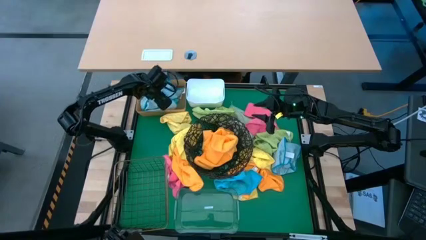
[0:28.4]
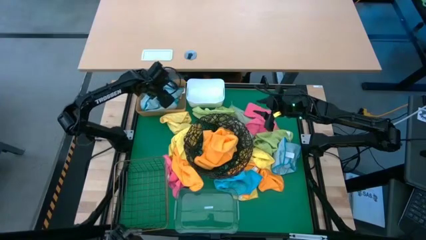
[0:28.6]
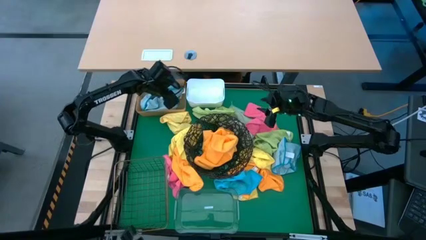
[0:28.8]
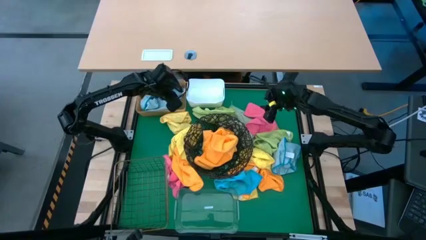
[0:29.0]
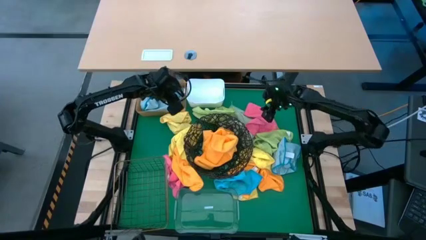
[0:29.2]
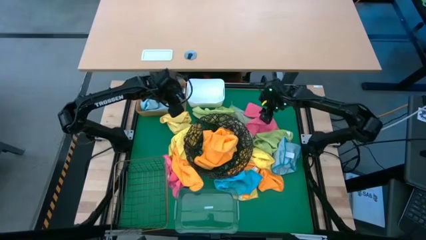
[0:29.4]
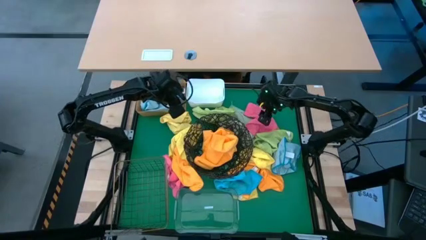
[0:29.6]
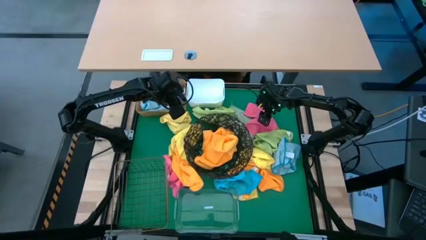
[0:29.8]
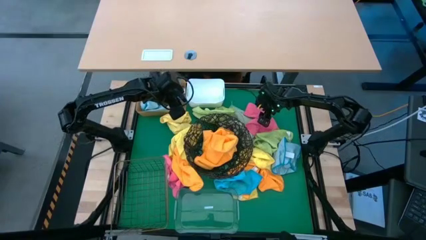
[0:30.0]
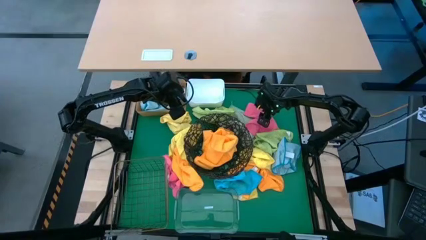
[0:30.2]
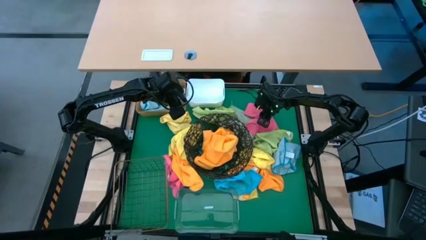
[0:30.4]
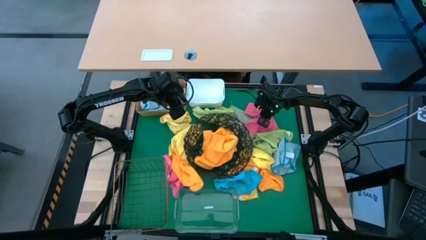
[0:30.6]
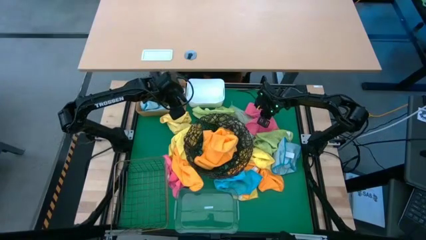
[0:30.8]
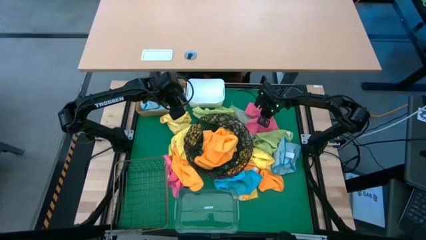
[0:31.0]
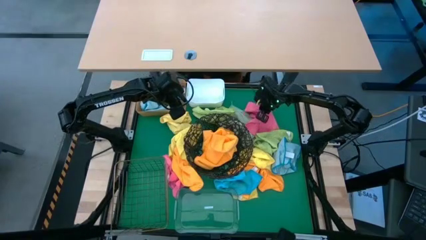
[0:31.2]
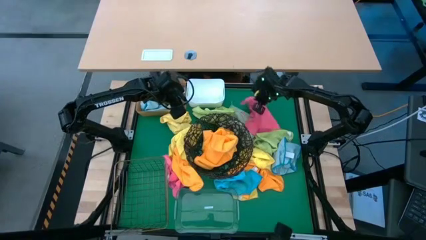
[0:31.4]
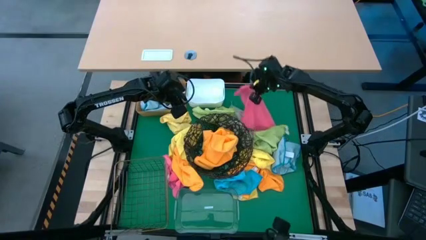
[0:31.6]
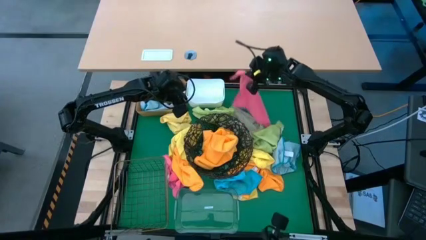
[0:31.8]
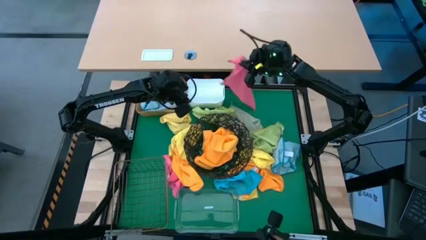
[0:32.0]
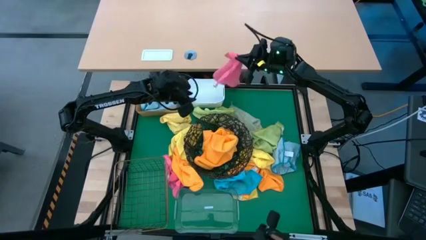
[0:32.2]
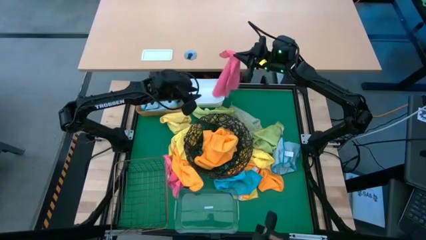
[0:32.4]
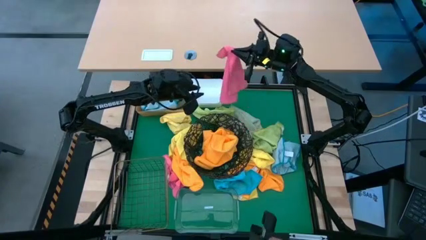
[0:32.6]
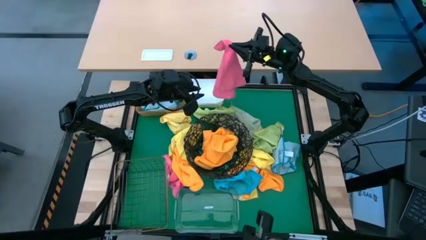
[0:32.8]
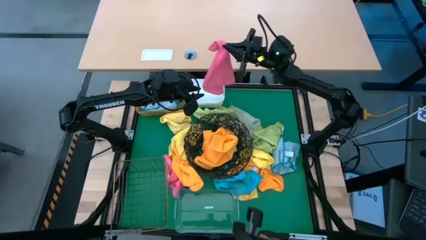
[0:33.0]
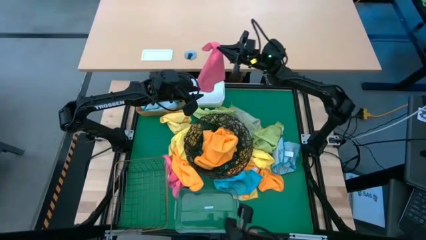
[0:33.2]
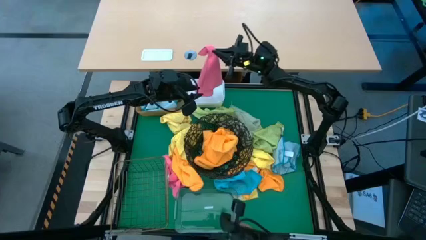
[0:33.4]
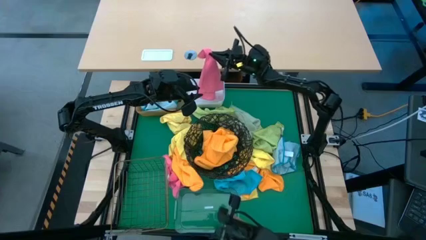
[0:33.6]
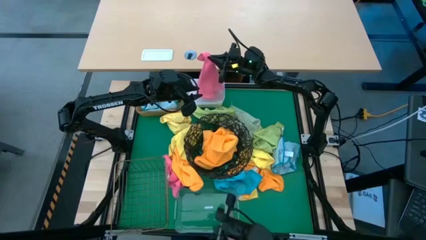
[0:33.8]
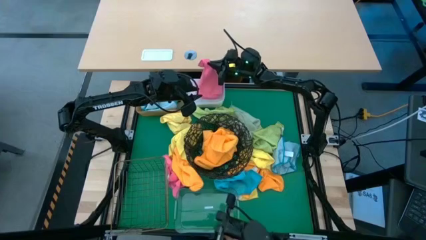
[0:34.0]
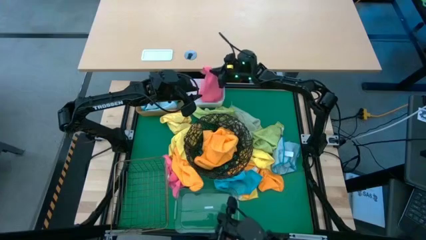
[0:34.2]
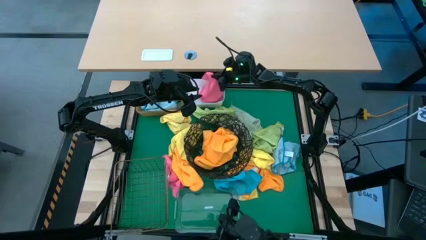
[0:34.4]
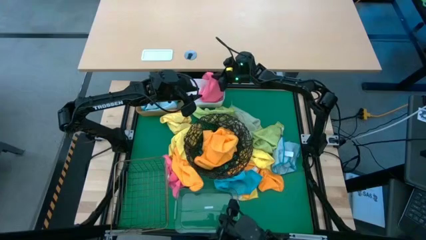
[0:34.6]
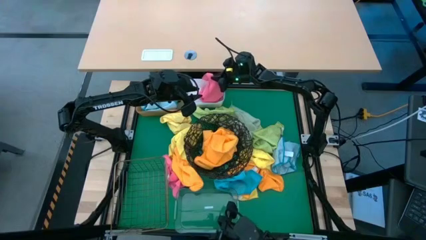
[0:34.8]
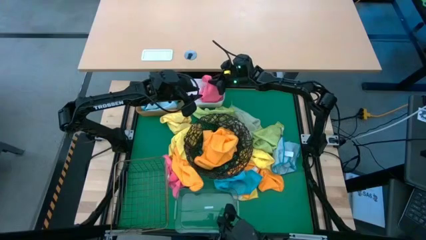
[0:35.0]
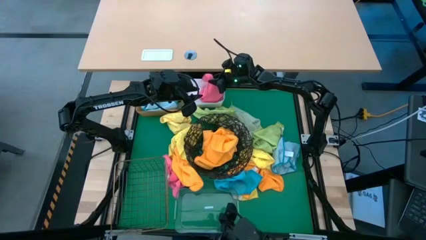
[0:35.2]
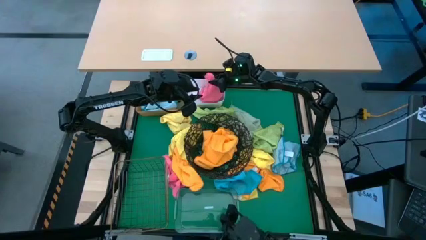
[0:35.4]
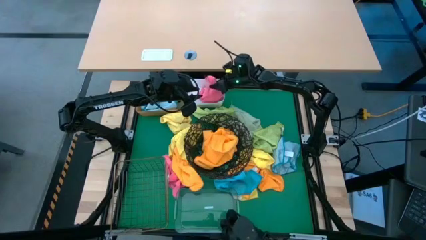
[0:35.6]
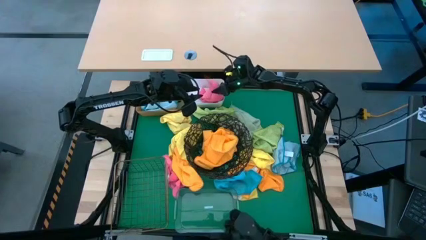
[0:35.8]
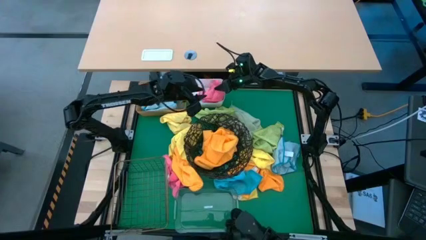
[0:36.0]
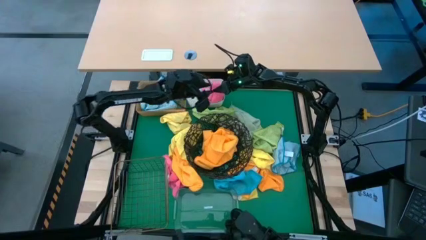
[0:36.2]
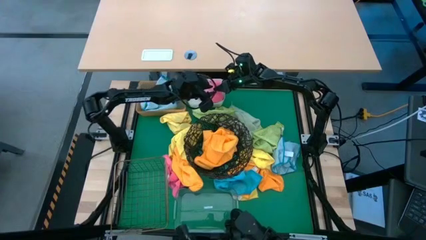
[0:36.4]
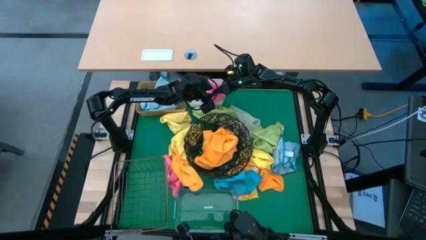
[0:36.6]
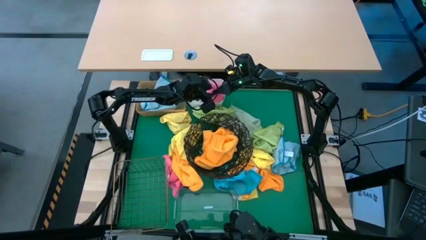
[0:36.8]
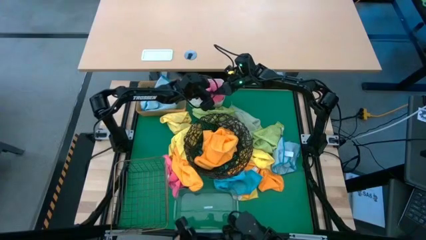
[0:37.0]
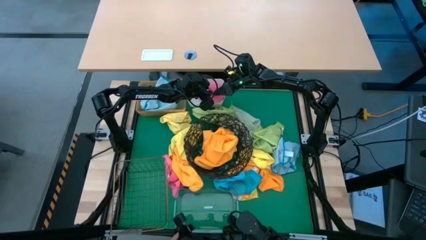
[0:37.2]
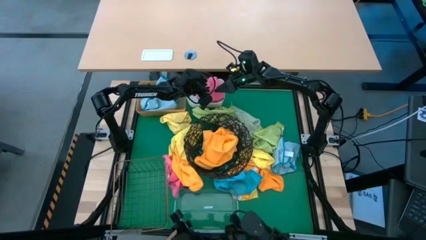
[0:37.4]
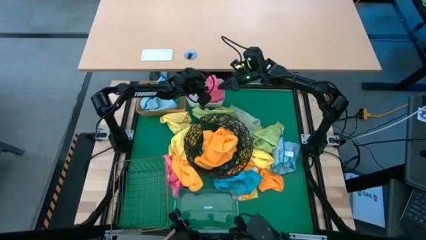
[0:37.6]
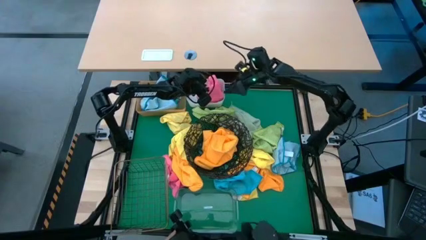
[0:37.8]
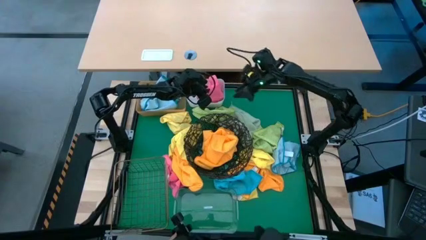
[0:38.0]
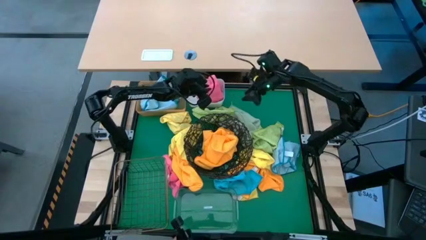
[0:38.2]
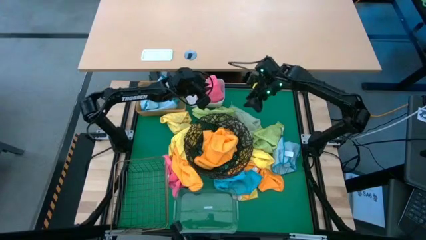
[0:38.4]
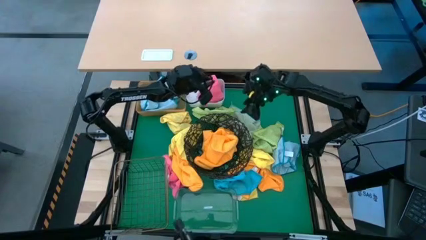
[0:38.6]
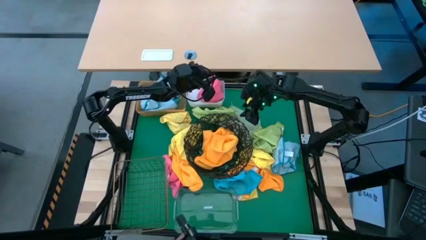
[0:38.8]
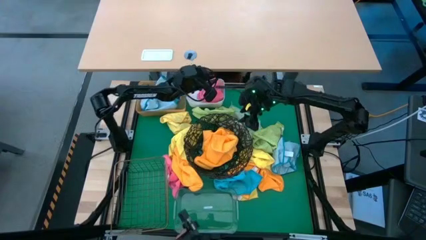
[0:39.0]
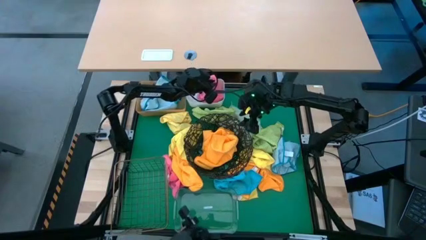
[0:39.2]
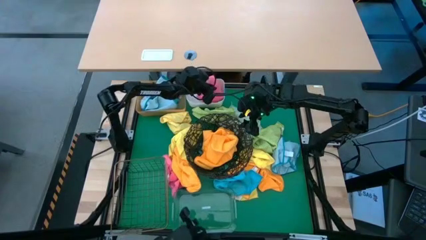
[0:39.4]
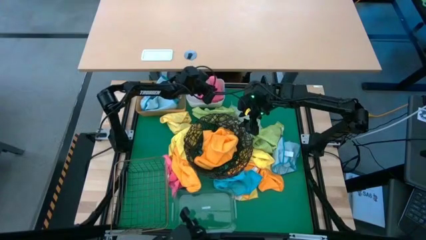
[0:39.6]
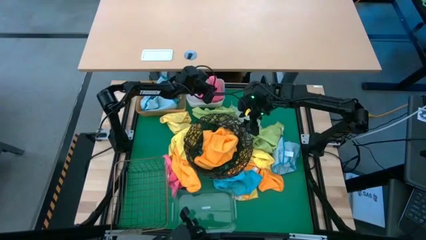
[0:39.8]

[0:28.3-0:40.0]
Task: Sort microfiber towel by color & place in baskets
Put the pink towel into the white bin

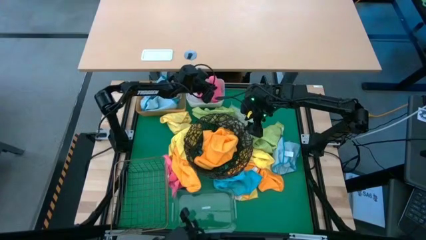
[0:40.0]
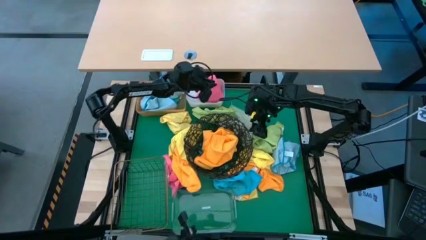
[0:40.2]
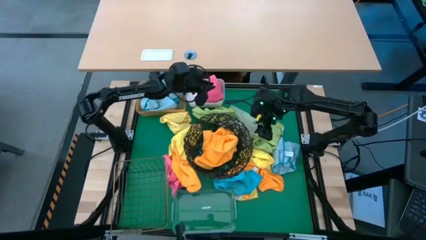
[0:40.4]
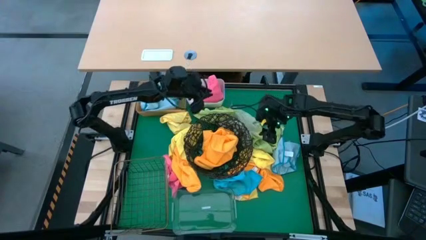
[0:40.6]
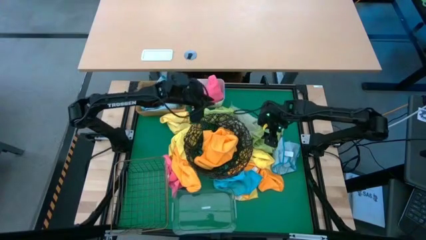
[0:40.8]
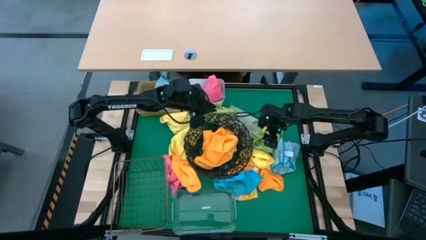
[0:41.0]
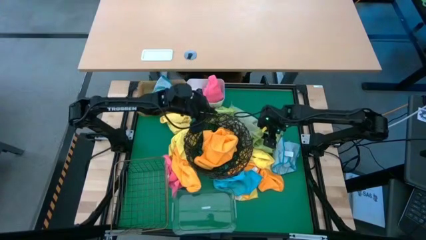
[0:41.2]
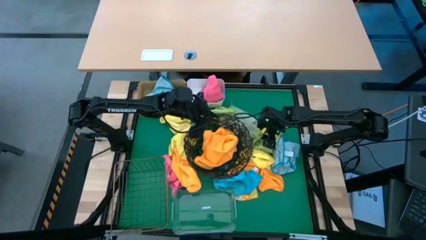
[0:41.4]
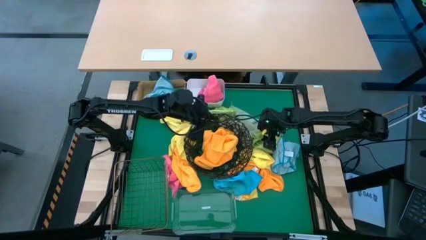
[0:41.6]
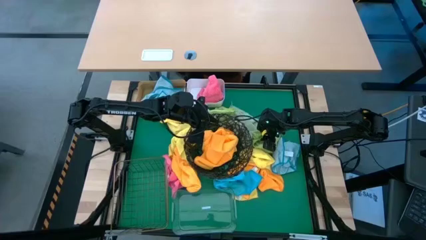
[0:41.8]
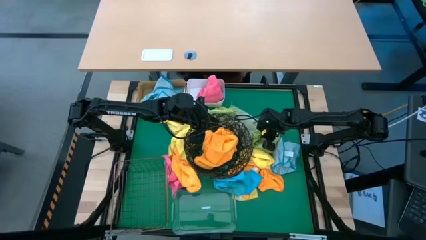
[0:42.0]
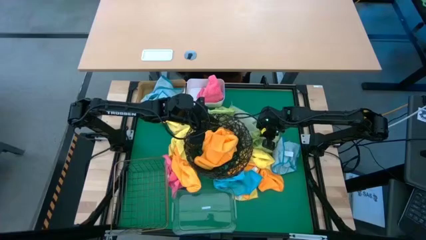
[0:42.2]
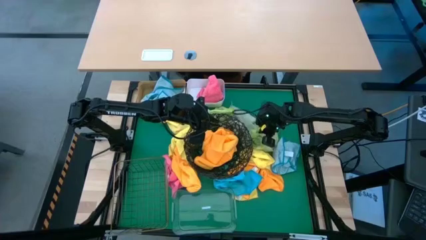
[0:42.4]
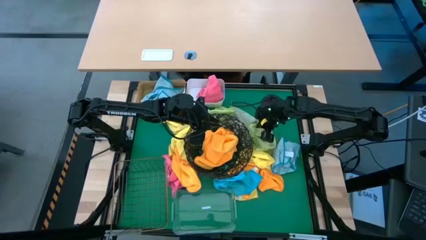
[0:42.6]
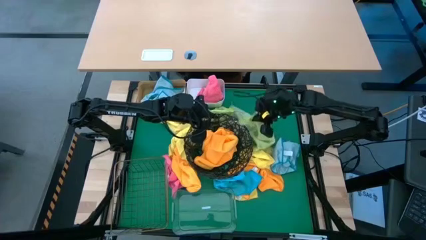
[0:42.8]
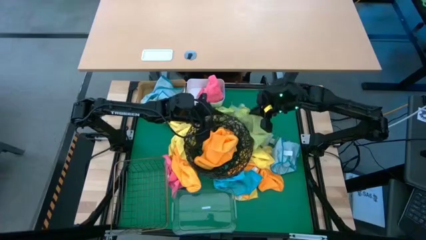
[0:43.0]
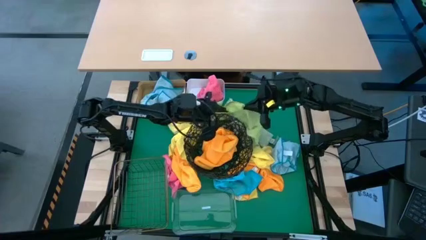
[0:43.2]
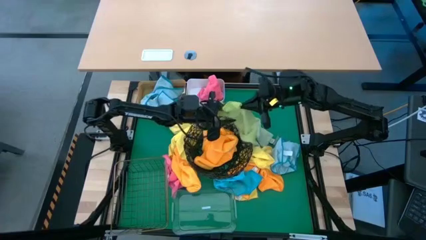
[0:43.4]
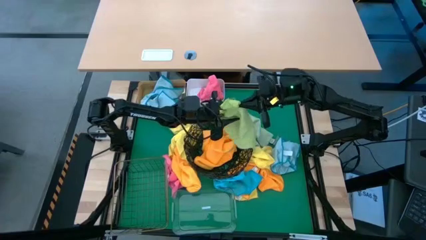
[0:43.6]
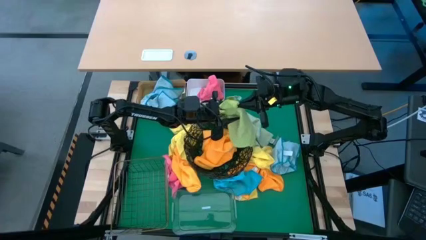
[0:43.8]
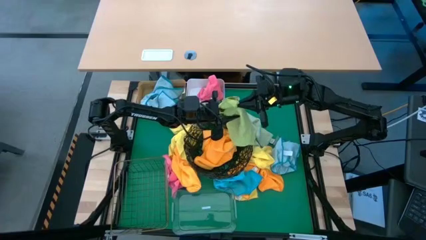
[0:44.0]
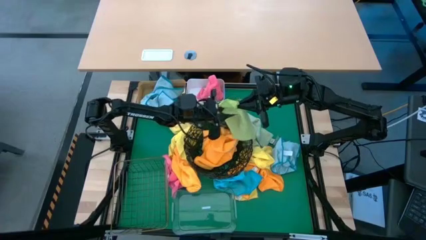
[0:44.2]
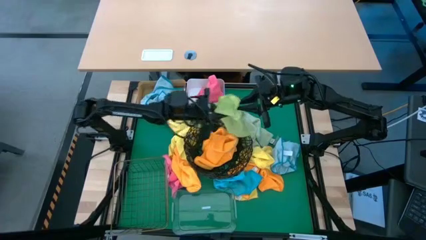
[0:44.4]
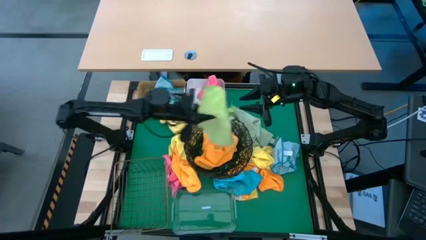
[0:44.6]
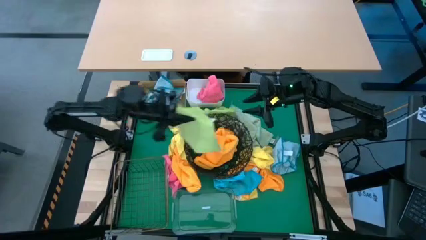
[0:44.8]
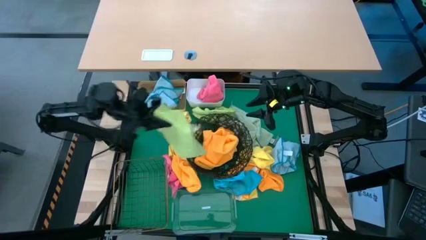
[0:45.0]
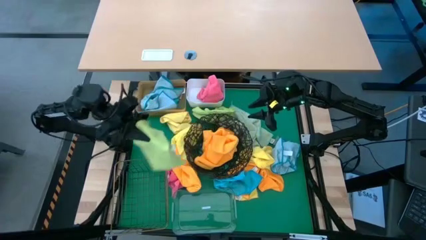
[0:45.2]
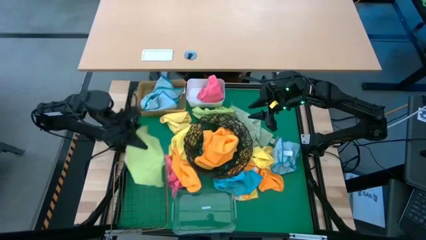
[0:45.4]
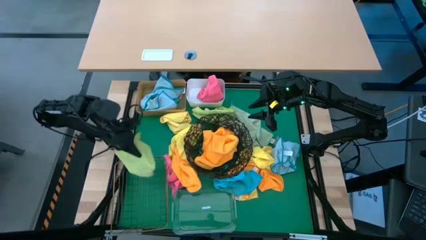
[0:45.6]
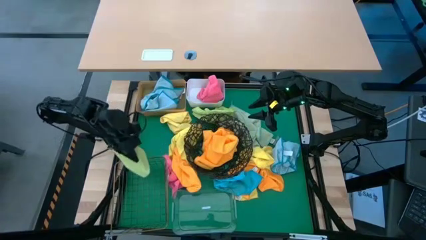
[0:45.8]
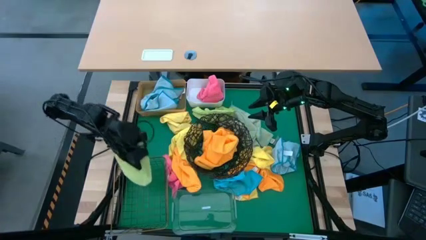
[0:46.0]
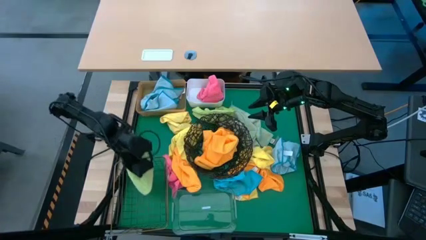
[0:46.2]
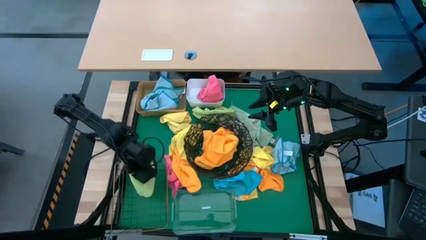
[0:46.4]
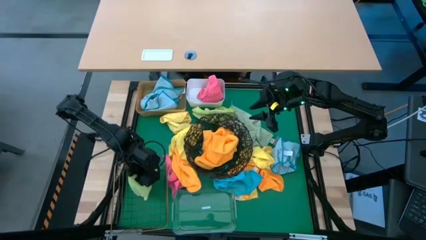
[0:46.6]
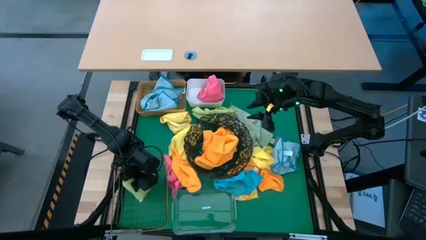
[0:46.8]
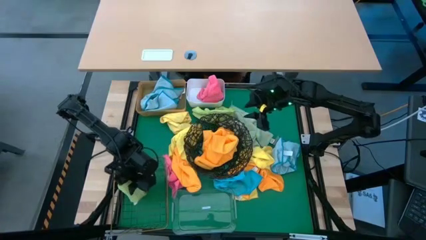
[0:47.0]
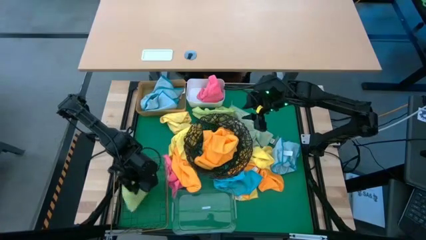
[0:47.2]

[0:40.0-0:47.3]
Put the green towel into the gold wire basket
